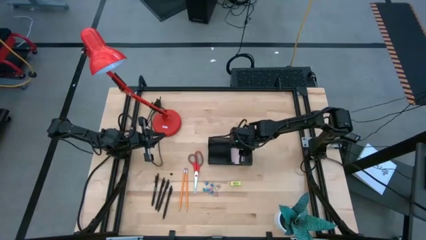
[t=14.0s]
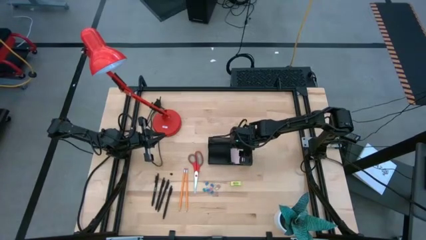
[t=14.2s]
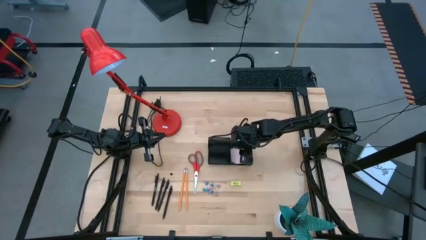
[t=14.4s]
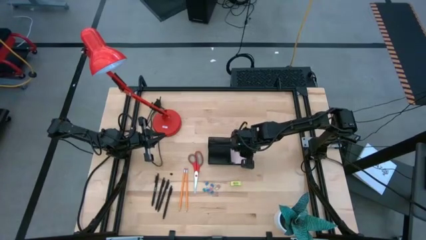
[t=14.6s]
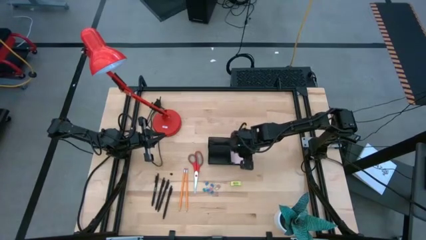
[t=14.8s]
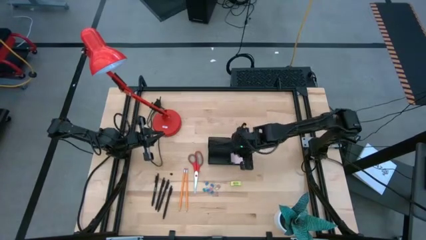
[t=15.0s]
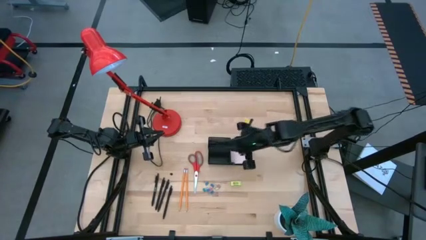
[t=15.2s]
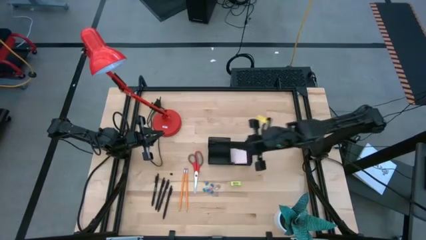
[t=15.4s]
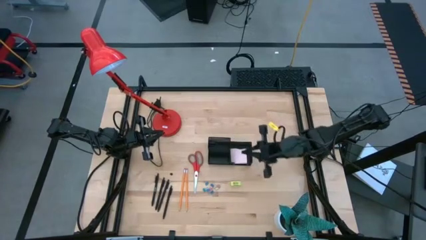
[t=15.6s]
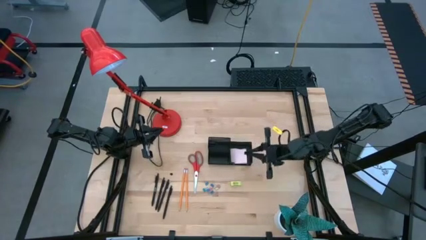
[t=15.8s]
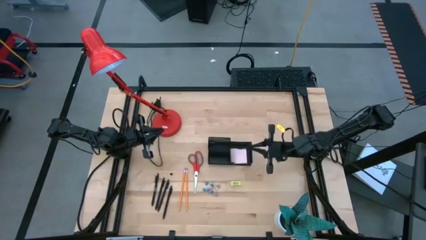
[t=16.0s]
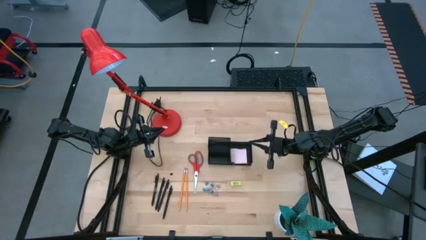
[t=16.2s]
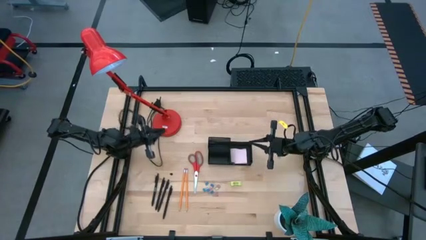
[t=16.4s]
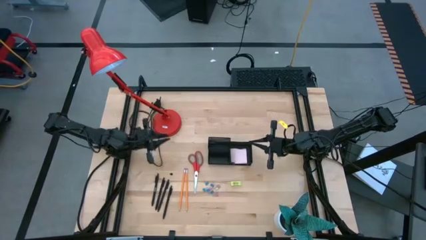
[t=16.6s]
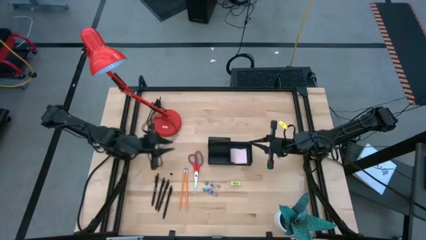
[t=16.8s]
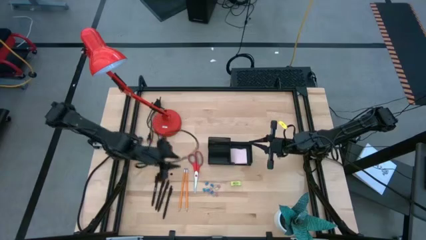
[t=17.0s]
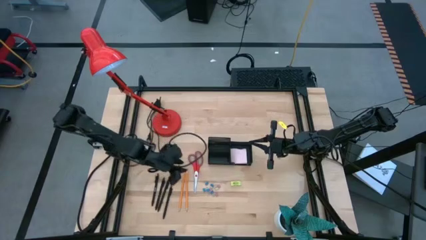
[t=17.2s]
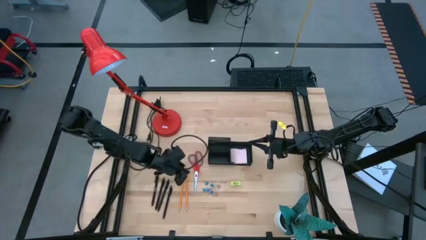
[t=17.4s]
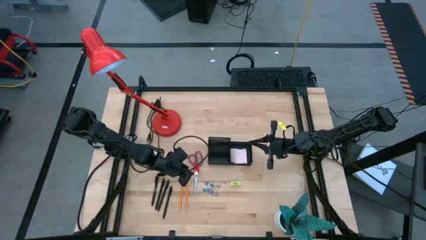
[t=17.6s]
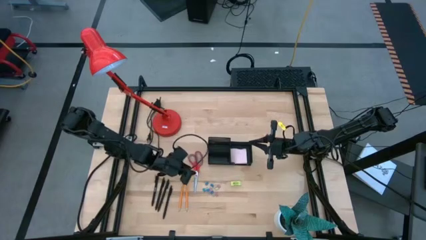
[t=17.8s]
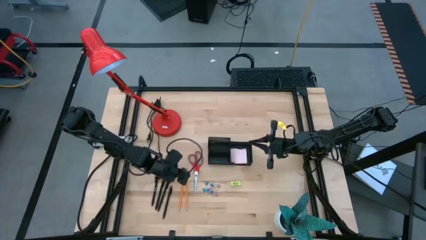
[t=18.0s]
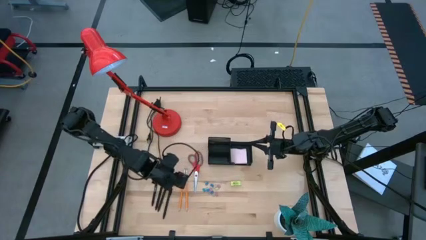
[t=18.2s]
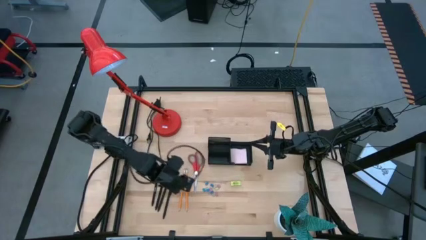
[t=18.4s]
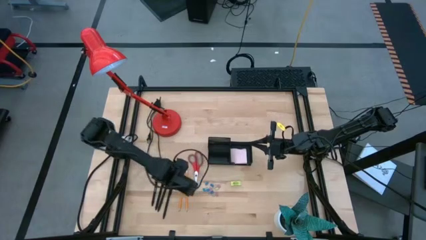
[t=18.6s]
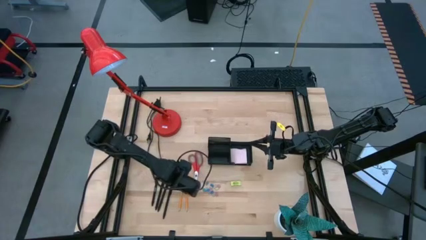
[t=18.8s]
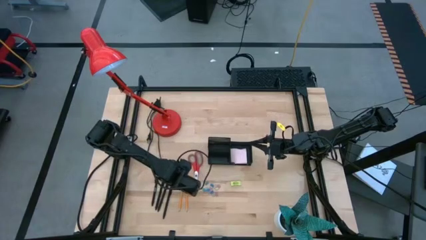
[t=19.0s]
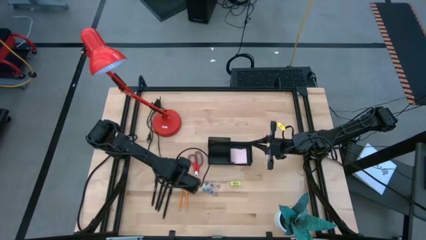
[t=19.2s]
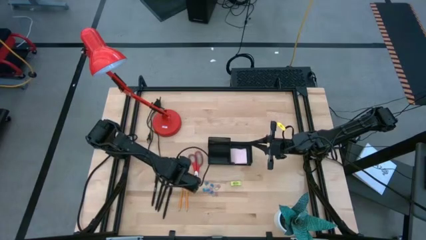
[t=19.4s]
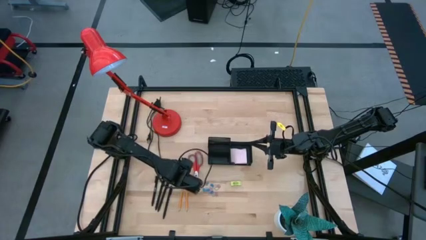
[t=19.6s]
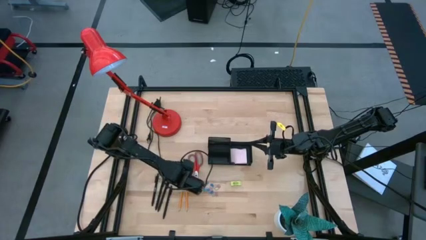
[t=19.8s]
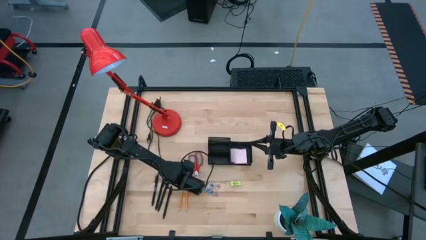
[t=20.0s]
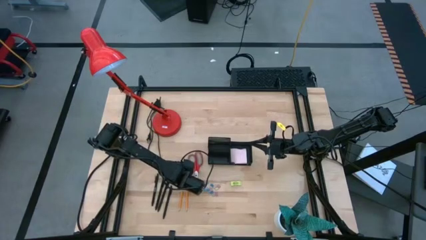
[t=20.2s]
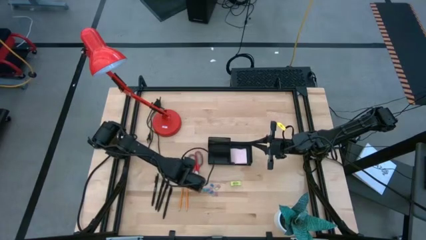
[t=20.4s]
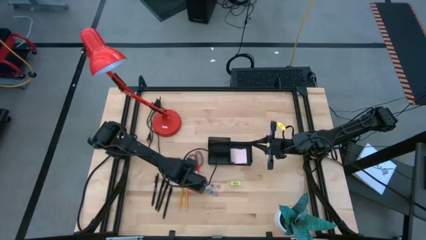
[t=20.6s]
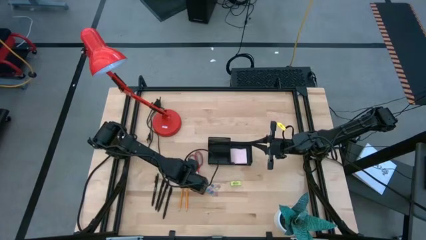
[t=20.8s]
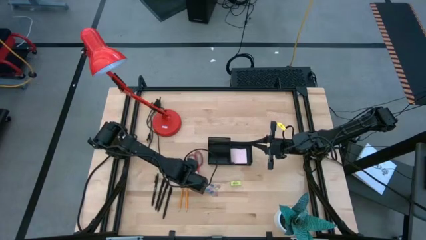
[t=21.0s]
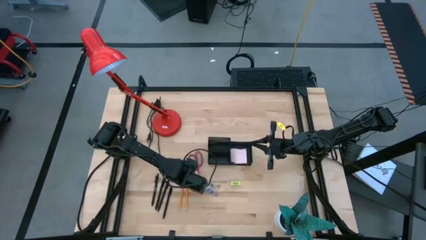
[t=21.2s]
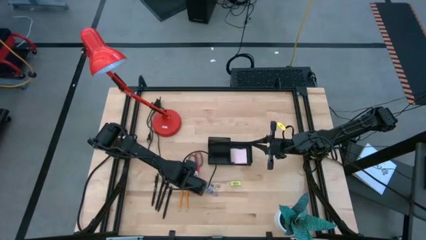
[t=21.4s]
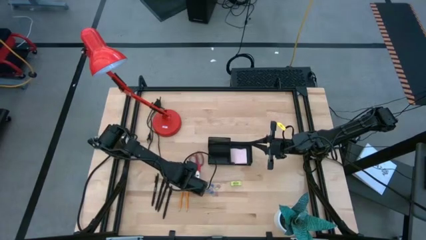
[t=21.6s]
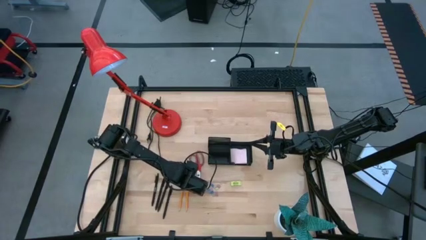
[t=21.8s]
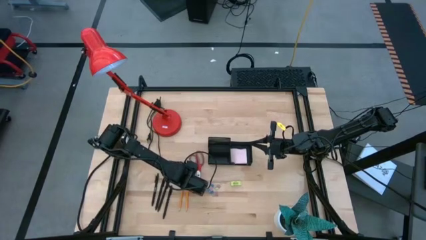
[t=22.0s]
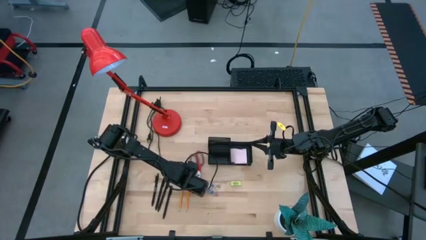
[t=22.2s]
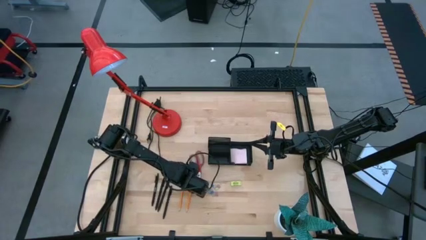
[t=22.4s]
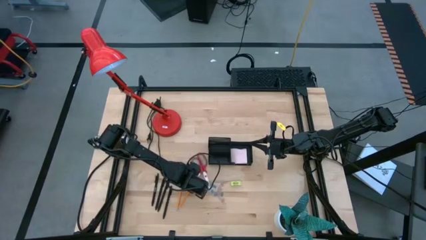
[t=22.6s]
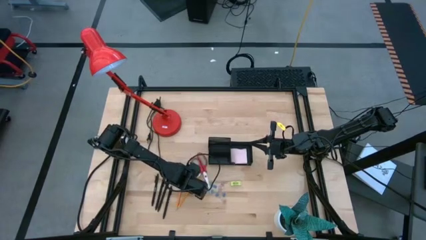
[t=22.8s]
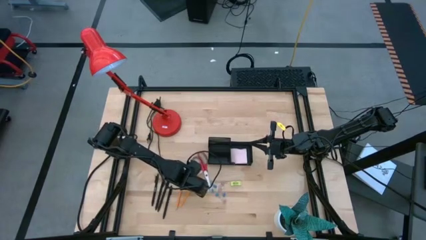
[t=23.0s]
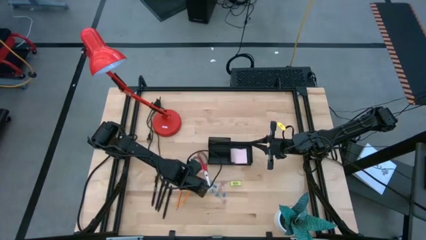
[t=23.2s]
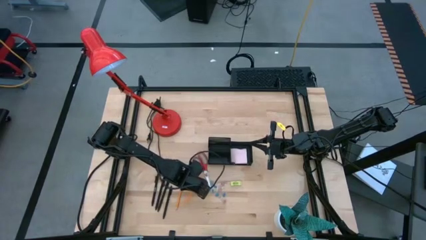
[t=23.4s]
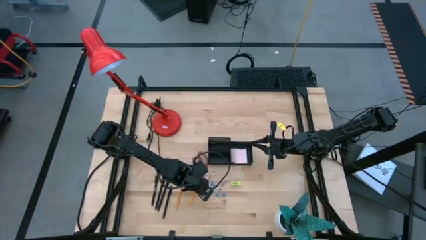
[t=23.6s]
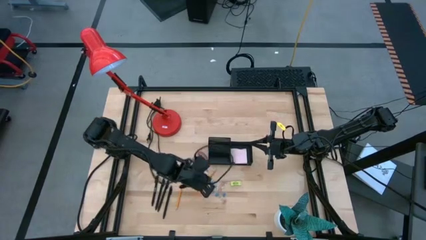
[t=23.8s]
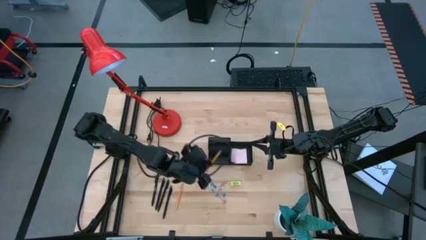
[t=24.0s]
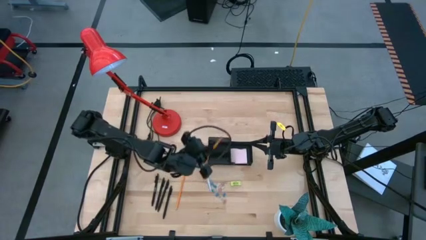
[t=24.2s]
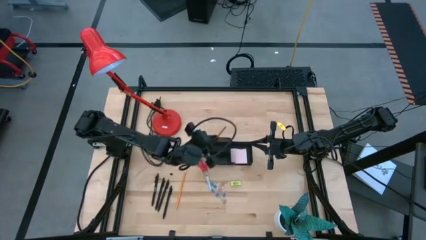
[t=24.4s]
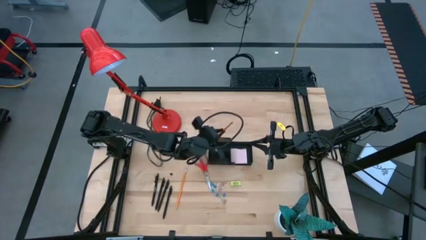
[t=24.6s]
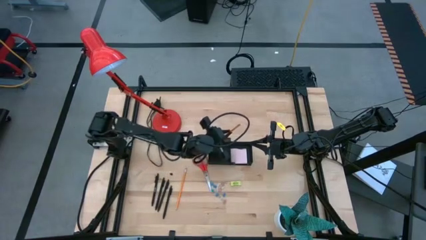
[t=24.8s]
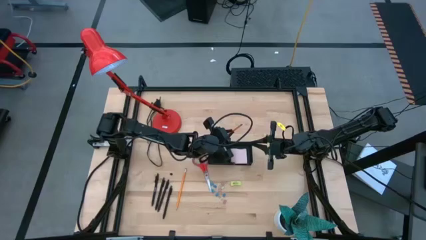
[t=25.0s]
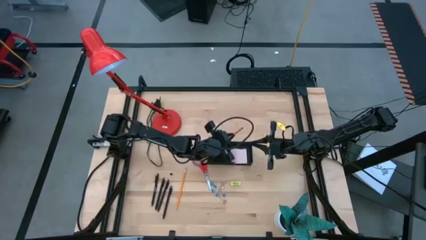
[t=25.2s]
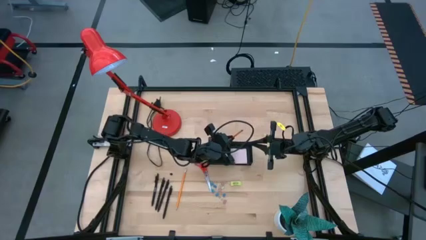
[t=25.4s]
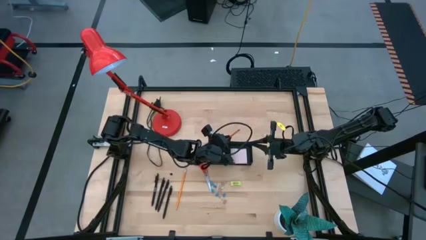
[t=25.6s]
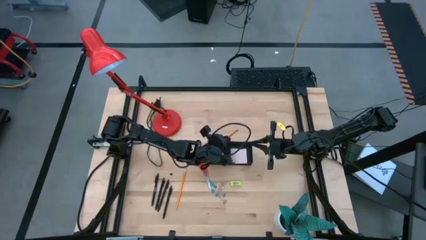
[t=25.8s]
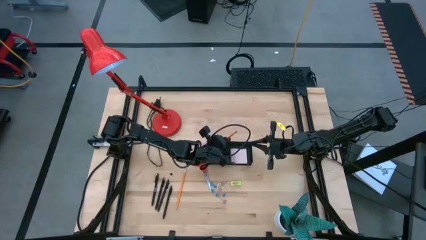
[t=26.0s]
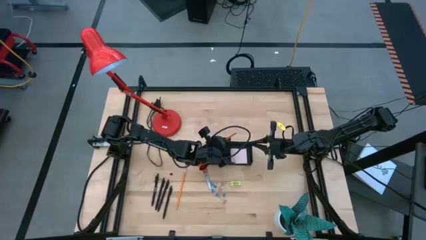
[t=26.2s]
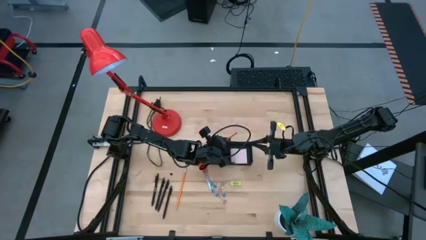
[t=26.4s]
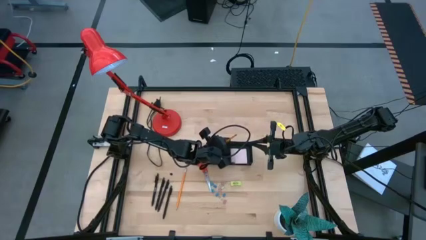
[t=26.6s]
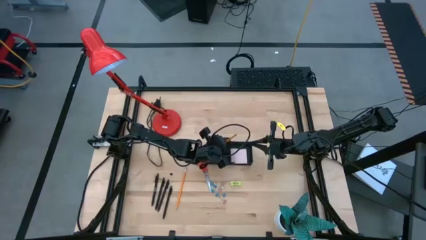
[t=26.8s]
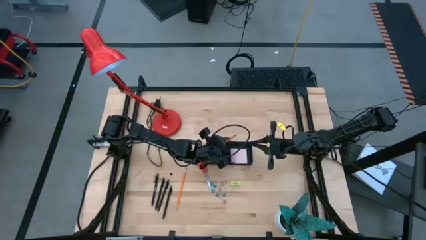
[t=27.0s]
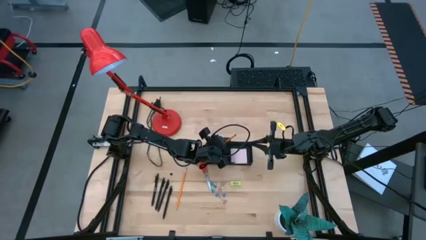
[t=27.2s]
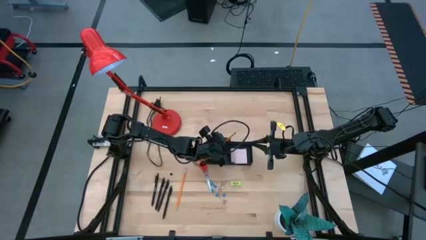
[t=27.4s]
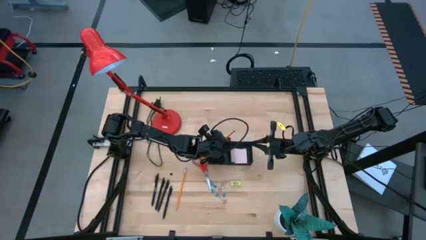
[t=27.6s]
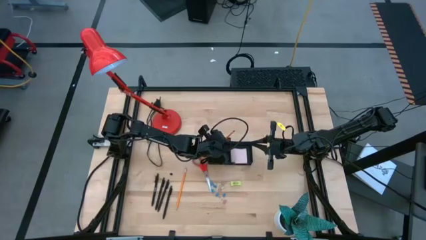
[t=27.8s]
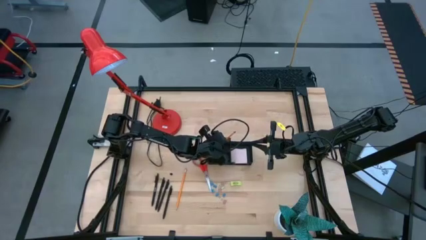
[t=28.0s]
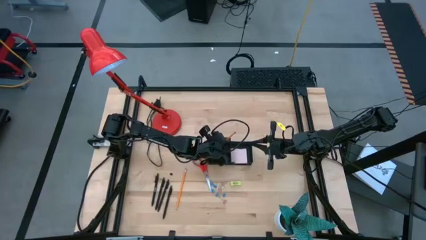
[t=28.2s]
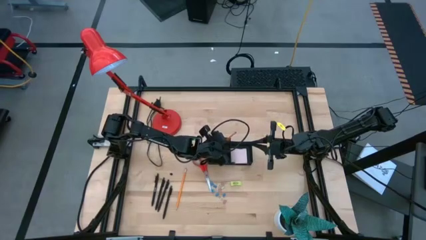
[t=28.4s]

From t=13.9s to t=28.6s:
Task: Pick and place office supplies into organizer
Put the orange pencil into the black desk organizer

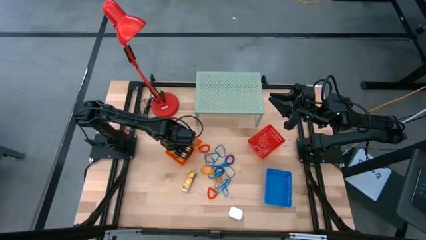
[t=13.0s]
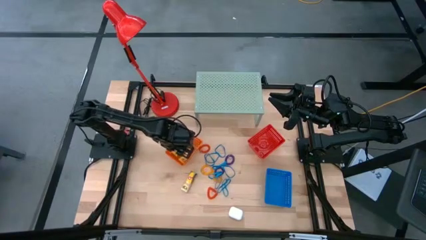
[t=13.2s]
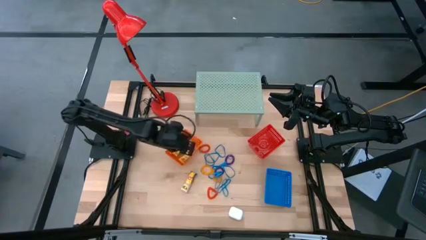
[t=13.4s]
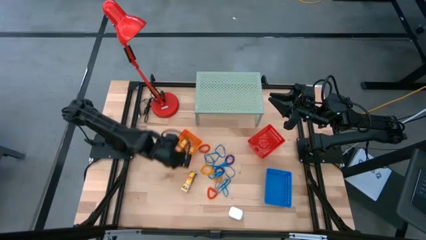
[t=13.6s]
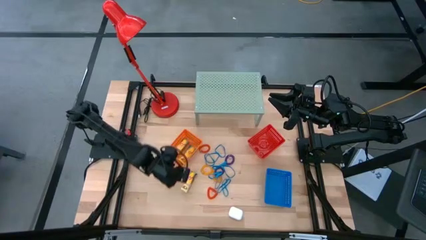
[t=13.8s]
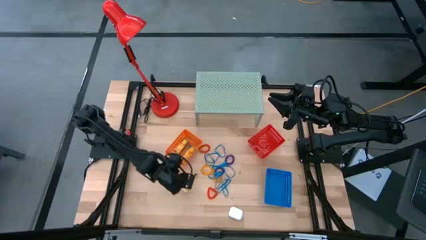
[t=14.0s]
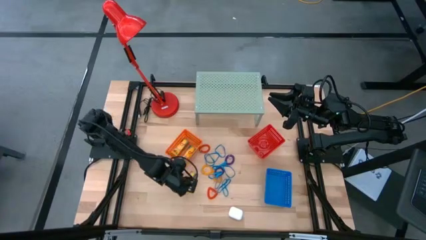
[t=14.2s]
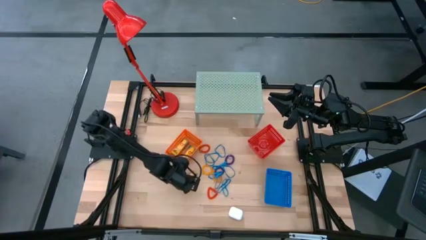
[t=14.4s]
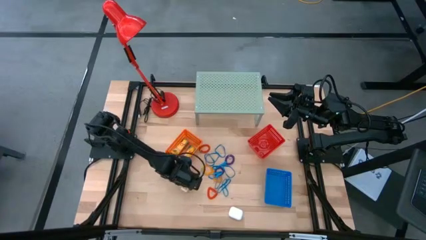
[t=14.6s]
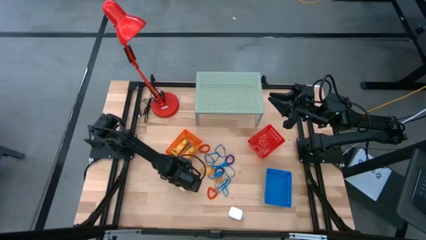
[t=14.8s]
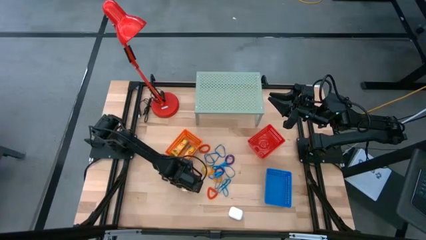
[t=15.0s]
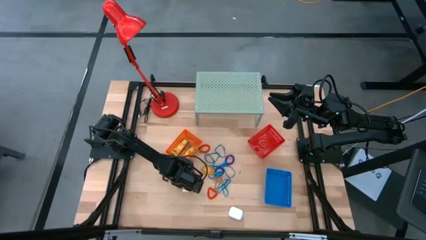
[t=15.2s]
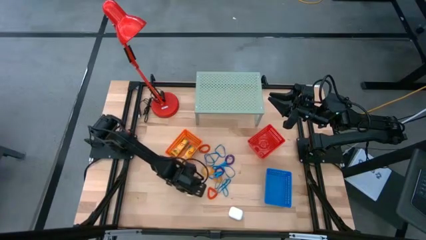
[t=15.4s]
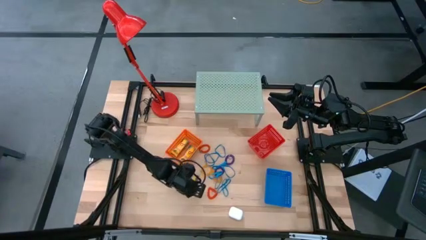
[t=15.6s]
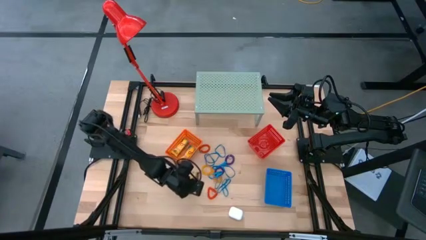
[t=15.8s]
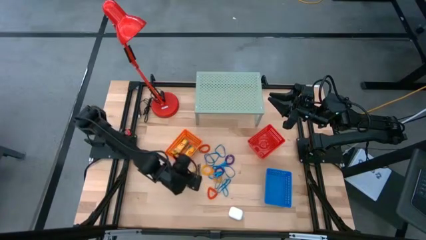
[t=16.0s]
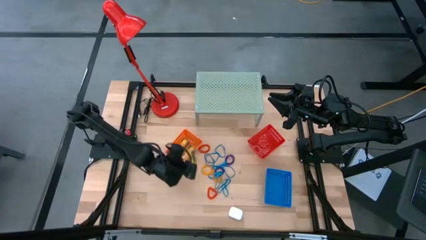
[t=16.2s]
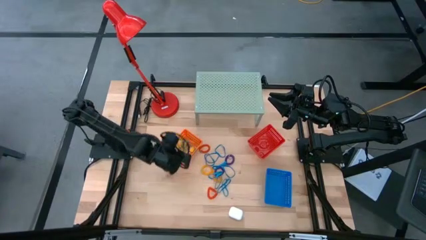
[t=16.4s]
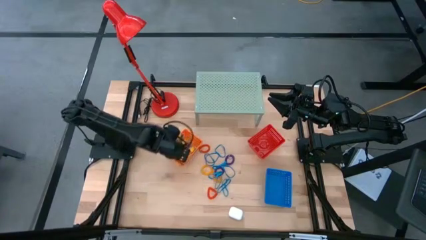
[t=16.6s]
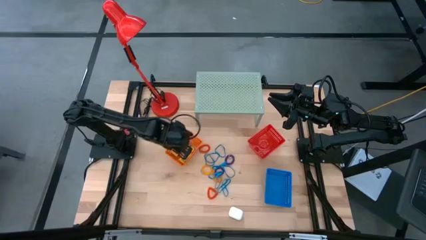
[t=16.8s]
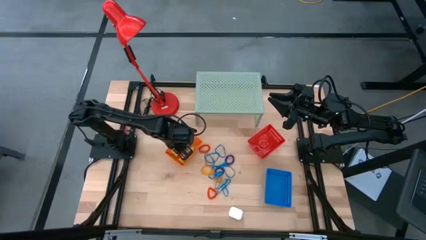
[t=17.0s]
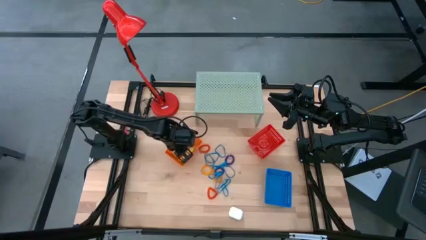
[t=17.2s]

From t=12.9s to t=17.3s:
Task: Pick & Place Office Desk Supplies
Put the crayon box into the orange bin
